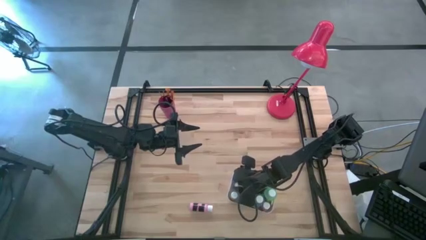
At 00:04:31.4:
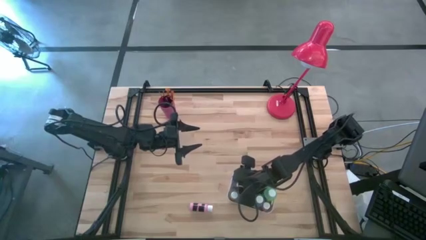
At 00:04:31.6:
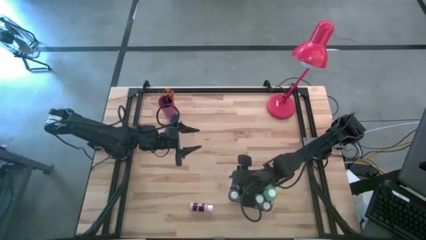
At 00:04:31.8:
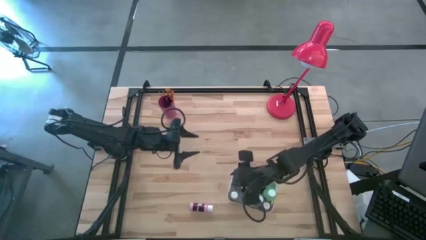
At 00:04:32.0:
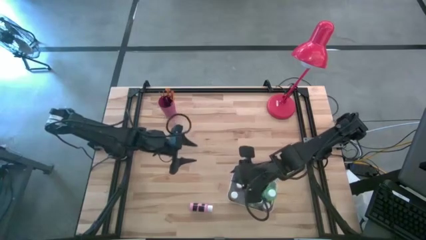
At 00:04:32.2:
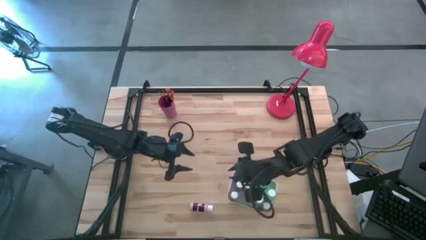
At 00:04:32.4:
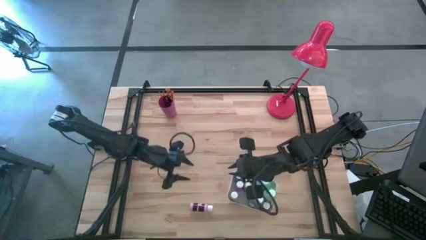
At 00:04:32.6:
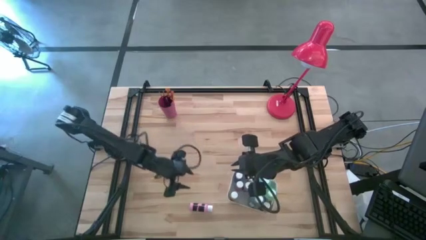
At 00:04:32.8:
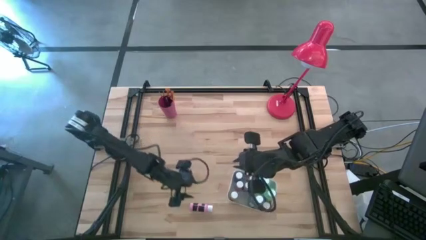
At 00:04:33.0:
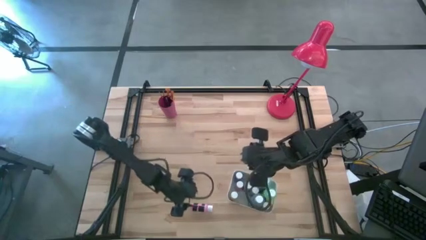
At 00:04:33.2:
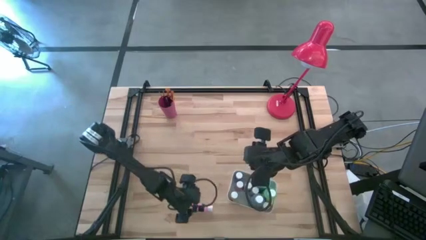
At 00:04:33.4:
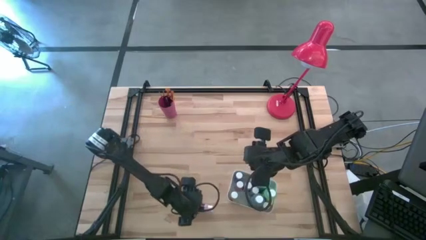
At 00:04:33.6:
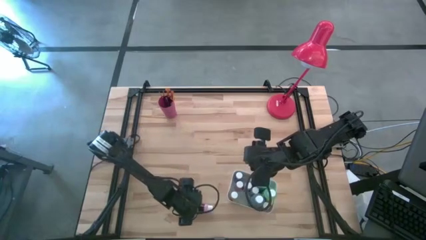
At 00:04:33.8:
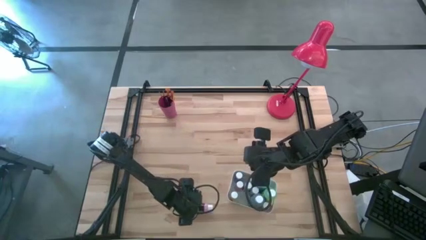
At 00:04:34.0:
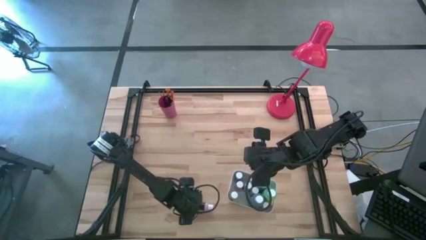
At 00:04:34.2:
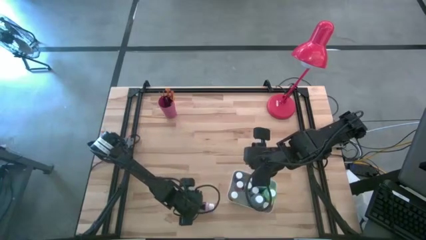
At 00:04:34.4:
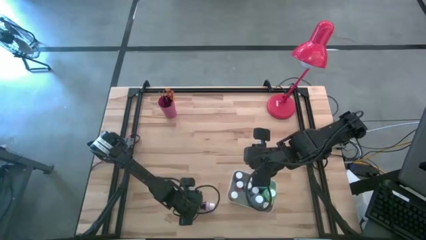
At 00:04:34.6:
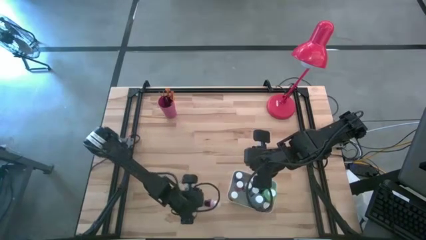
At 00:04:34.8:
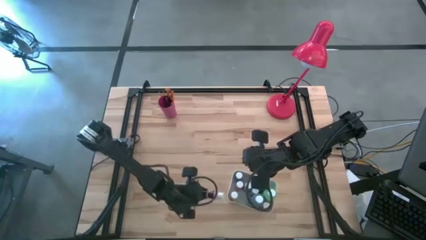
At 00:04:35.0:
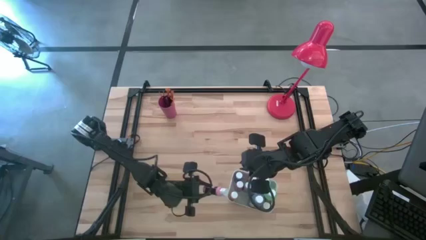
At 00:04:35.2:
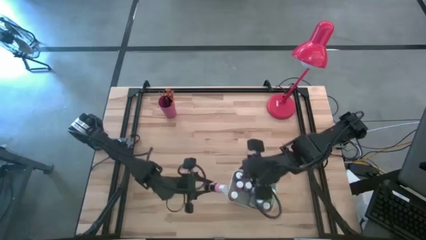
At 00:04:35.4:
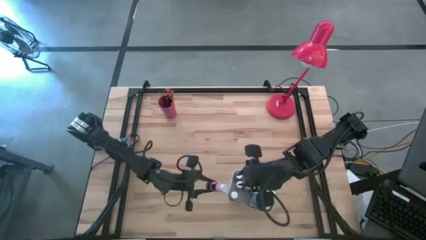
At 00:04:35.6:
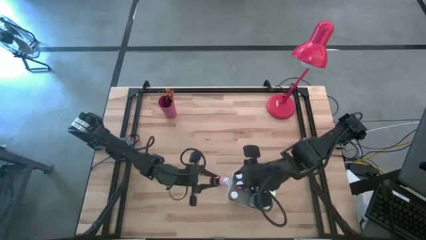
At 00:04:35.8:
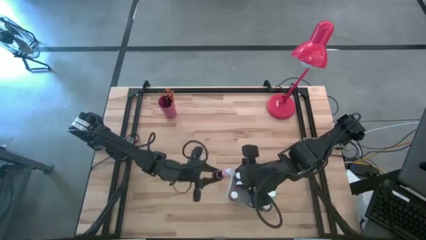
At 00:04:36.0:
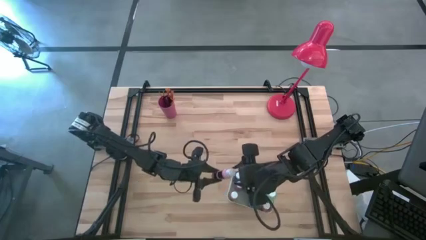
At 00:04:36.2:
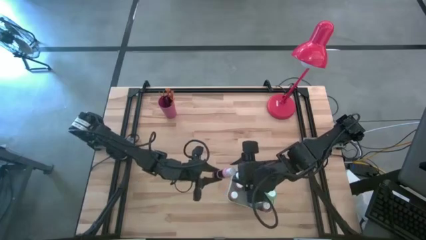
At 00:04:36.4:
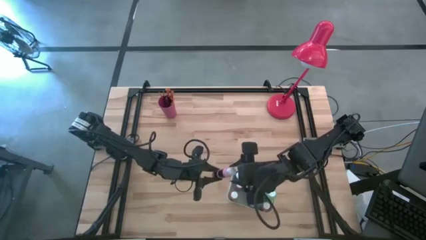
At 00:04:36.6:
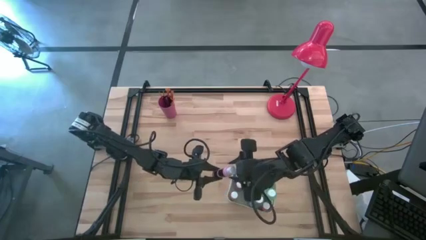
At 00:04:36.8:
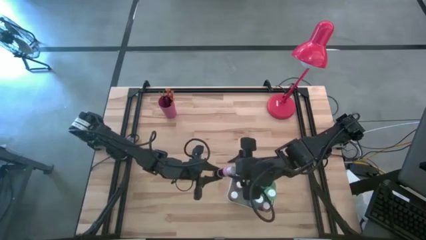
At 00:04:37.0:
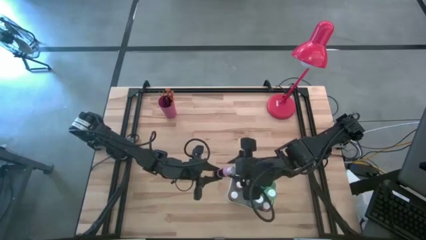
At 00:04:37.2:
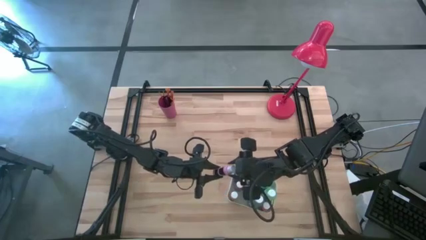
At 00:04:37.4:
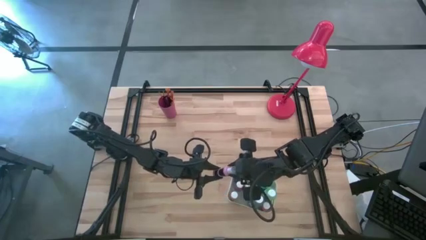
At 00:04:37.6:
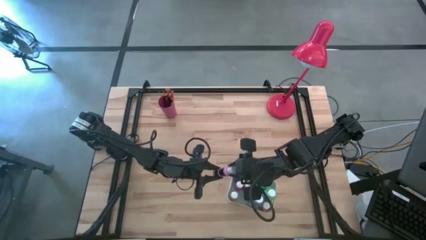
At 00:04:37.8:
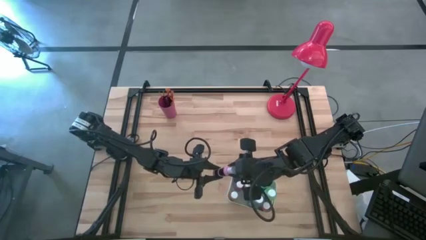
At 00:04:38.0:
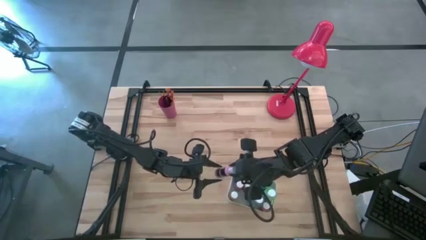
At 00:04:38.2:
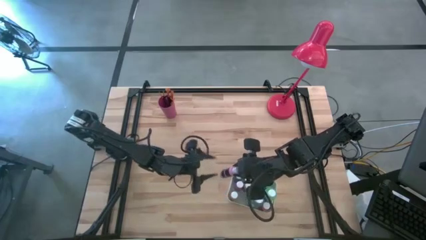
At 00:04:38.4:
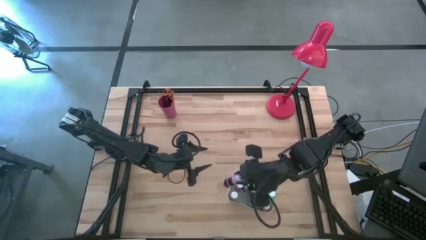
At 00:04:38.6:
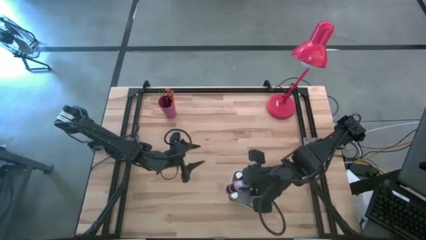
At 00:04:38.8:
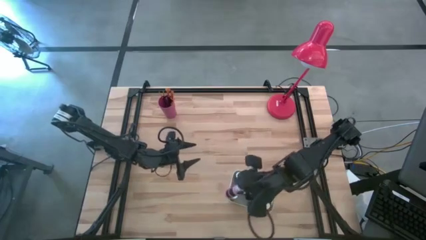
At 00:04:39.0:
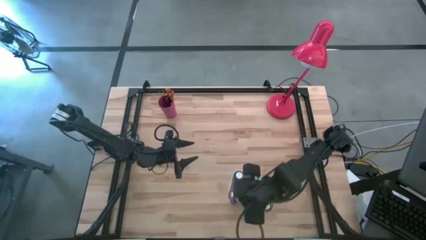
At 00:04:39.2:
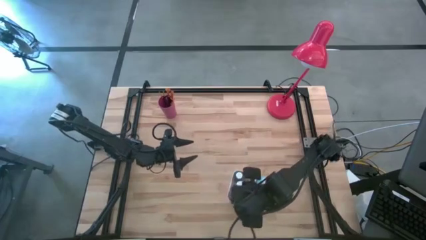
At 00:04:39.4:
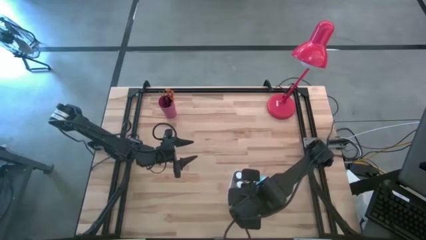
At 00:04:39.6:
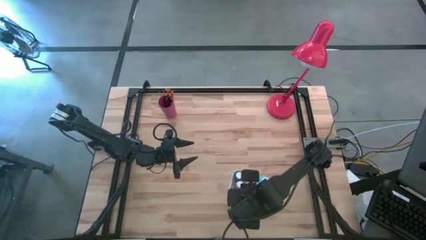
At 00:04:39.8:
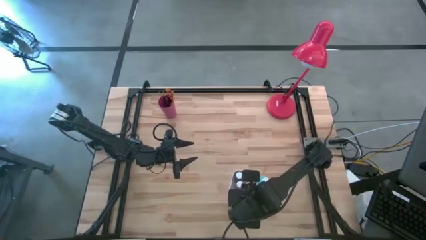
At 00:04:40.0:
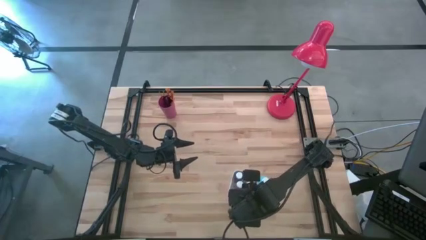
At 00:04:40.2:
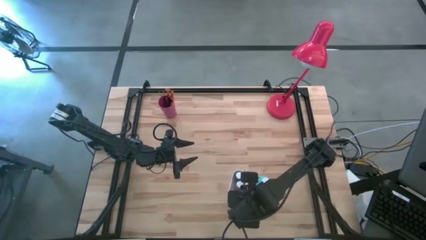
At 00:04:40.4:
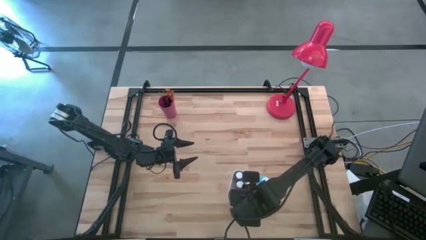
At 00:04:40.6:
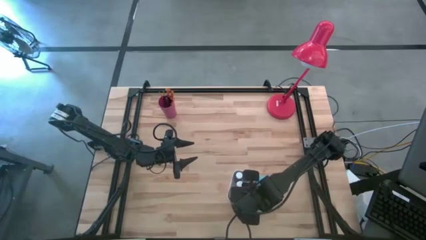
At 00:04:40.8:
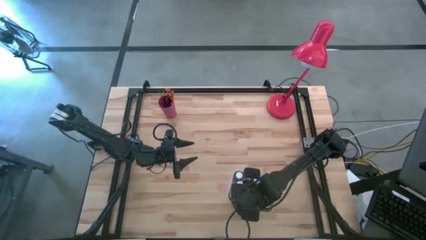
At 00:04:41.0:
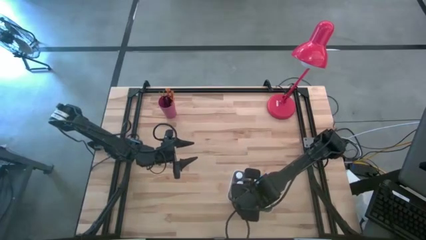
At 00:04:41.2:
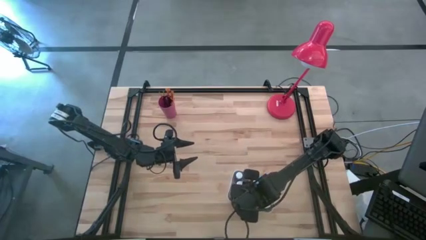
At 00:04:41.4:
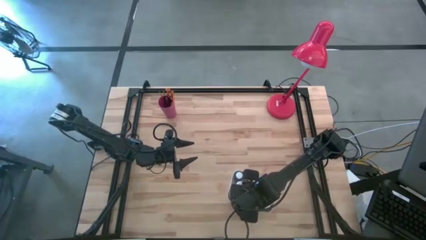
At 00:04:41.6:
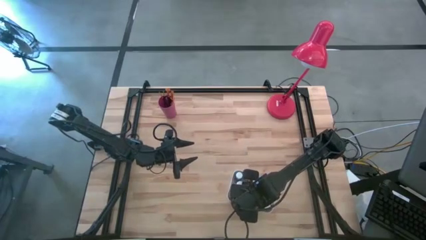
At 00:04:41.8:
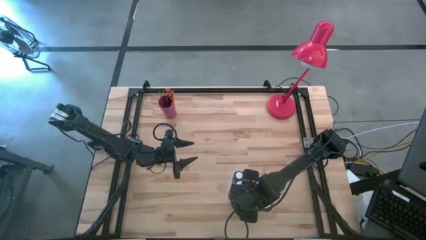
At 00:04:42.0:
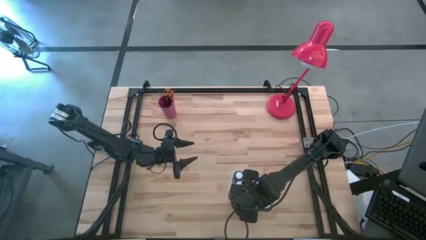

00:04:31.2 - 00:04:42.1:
Task: Pick & Place Paint Supplies
Put the light pink paint bottle into the white bin

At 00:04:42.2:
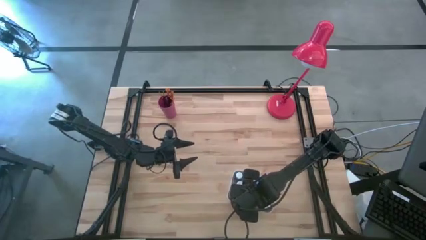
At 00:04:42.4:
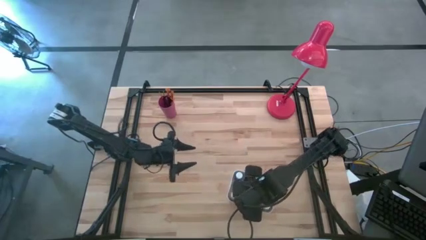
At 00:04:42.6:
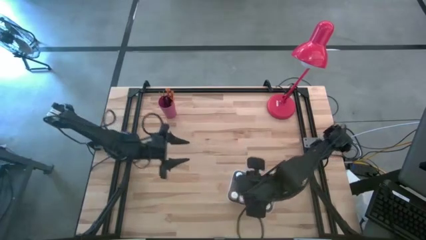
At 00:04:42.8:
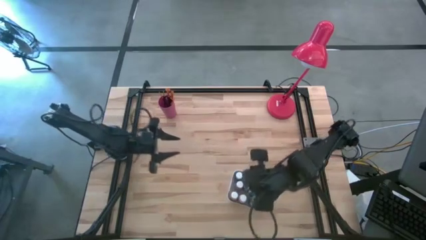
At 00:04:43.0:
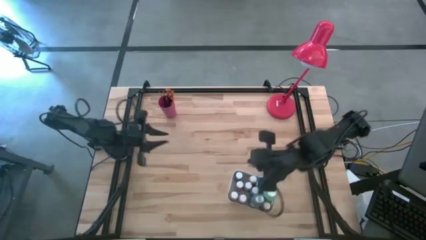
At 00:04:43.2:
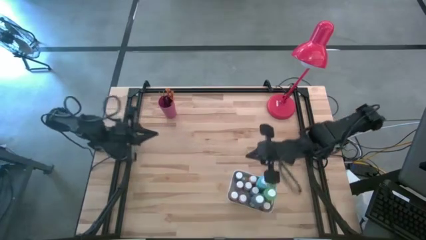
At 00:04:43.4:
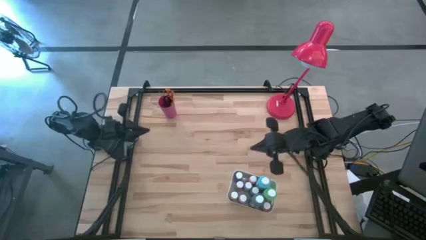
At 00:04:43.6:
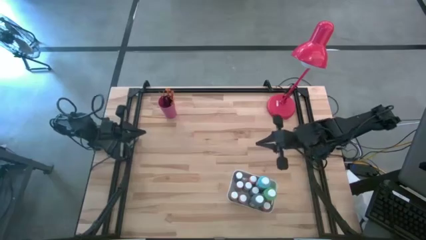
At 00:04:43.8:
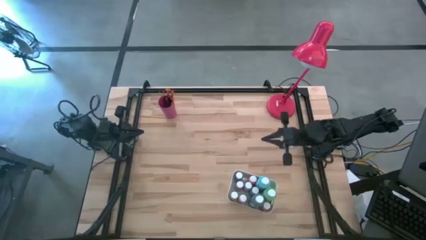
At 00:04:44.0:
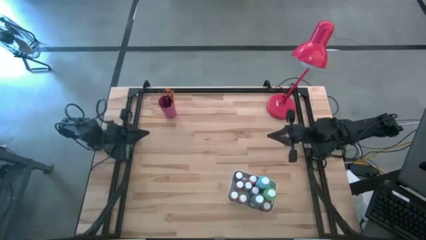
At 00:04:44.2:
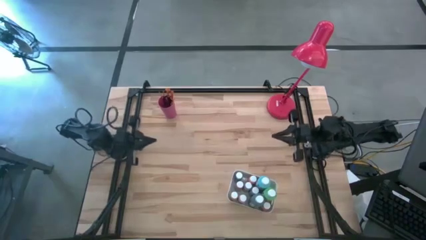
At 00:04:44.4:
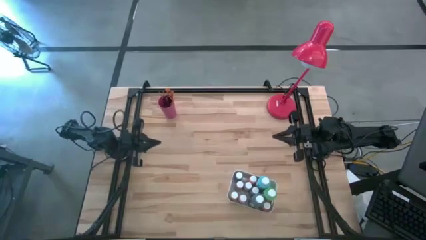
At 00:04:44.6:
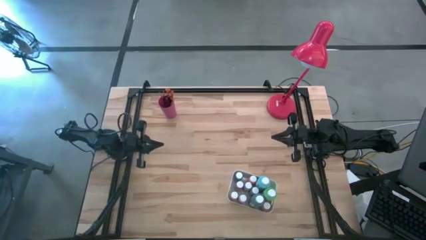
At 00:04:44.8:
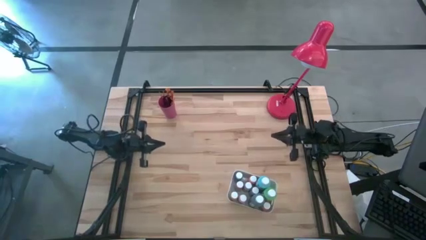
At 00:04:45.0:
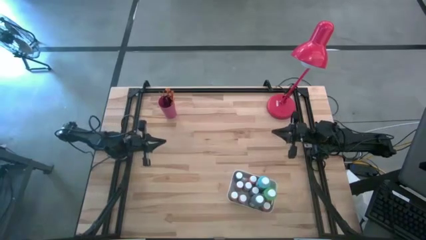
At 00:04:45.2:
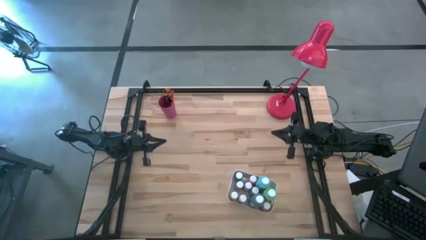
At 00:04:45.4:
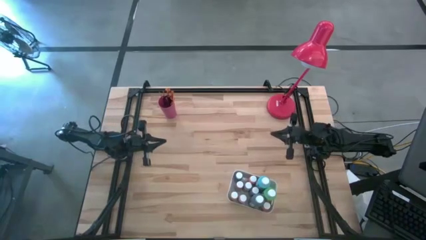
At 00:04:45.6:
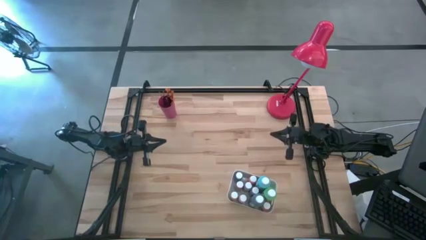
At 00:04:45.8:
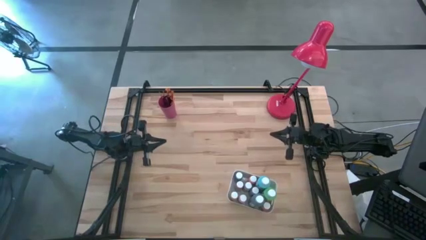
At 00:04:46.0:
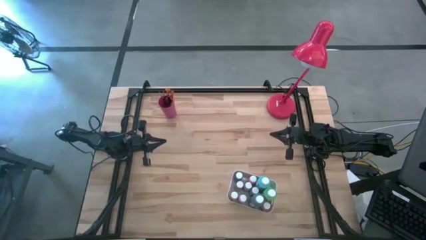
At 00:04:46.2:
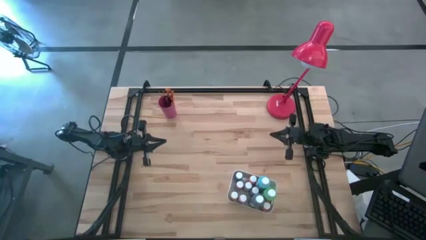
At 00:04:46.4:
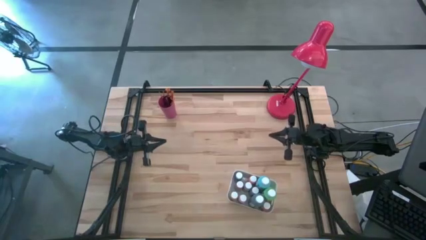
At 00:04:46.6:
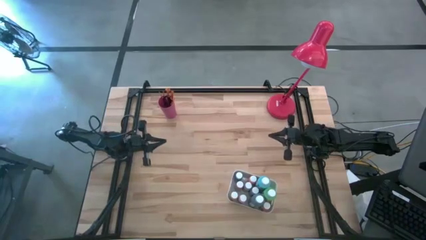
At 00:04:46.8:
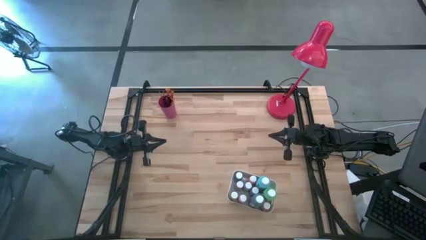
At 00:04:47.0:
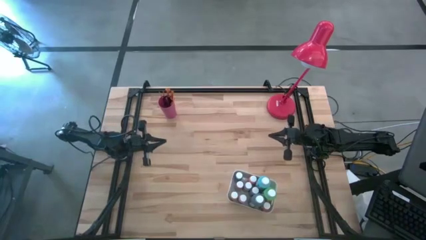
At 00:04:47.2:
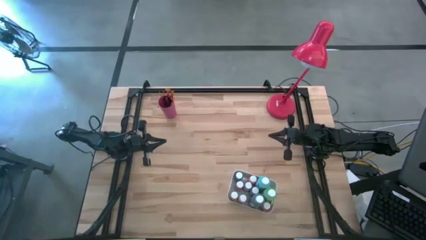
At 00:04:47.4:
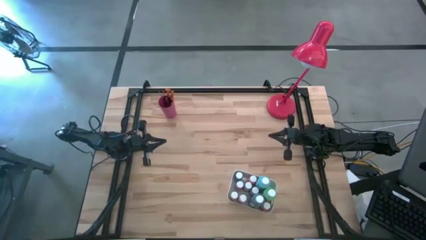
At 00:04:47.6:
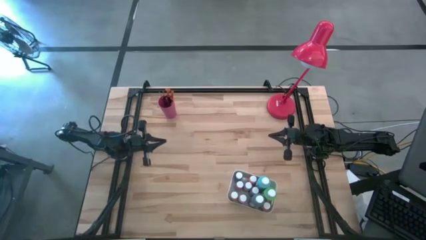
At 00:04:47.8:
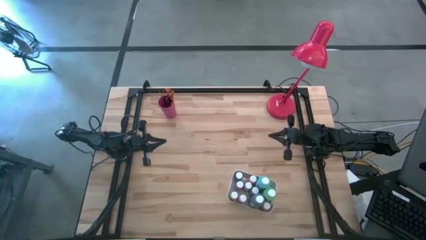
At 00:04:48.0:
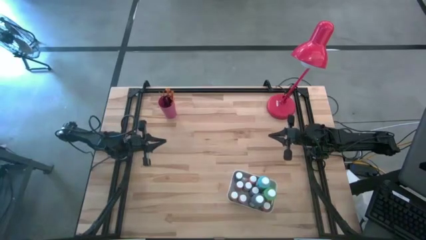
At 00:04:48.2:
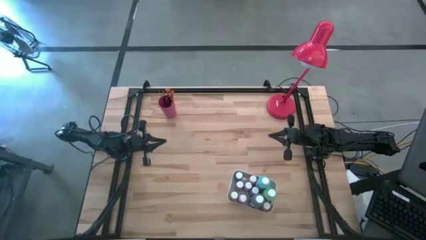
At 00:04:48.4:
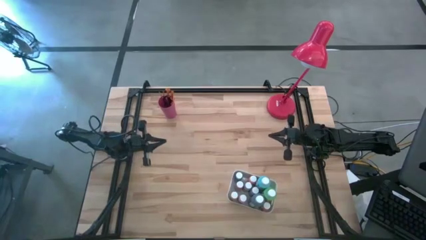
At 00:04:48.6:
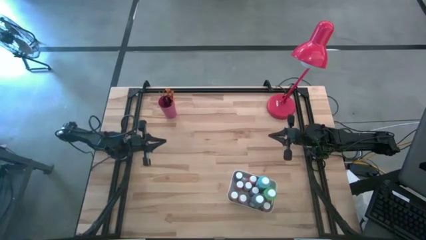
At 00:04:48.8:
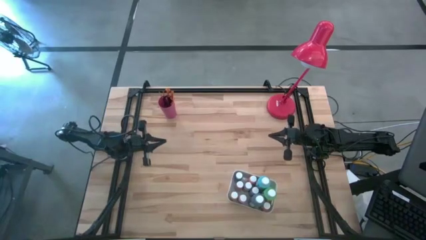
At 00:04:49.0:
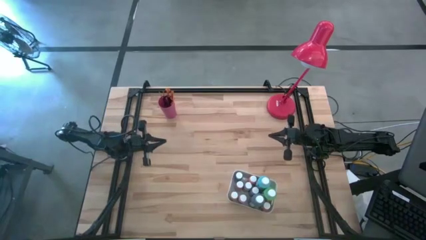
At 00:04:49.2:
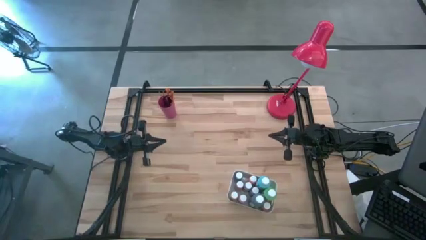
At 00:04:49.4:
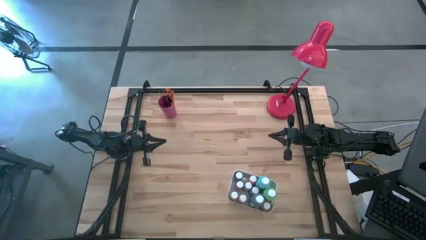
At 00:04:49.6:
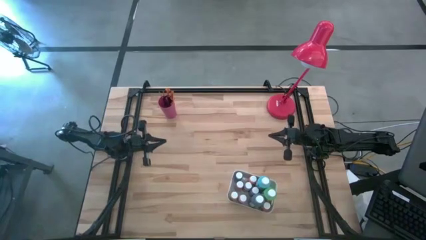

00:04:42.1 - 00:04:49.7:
Return to Home Position
